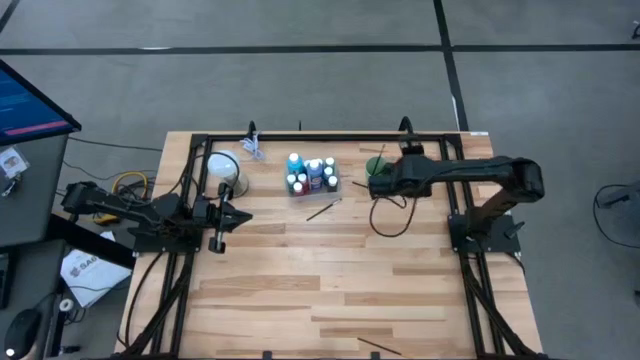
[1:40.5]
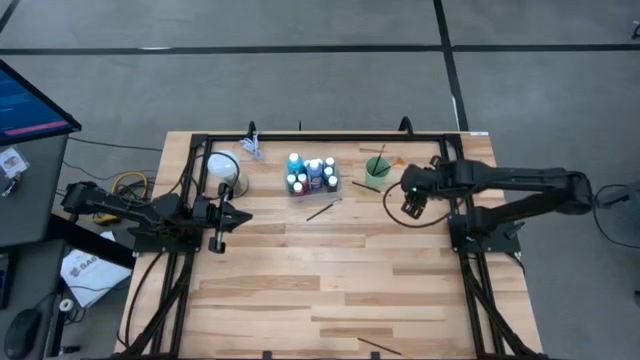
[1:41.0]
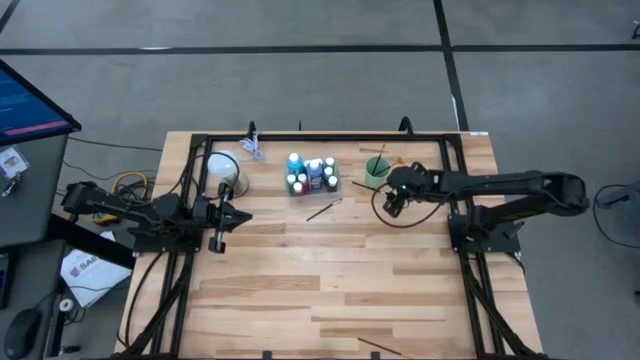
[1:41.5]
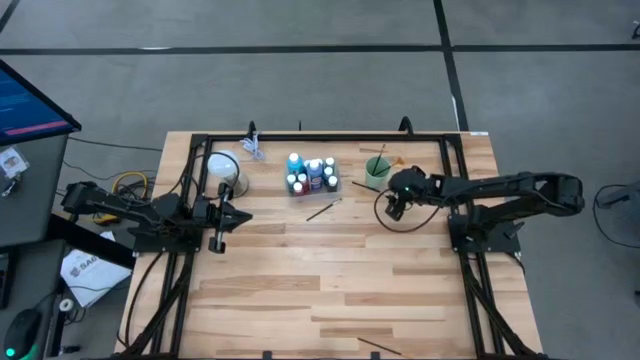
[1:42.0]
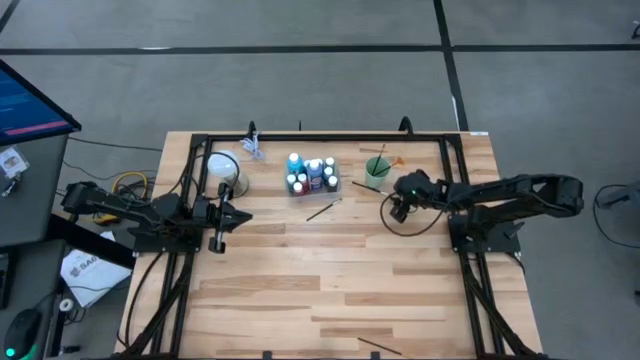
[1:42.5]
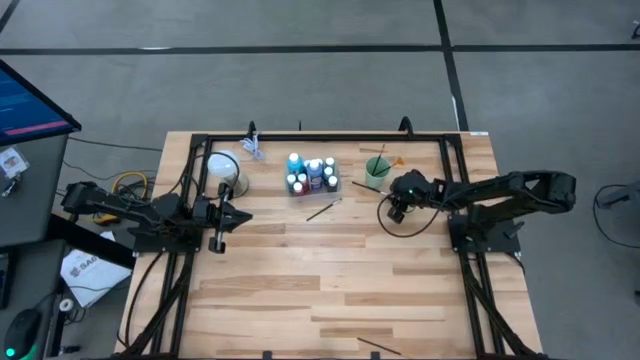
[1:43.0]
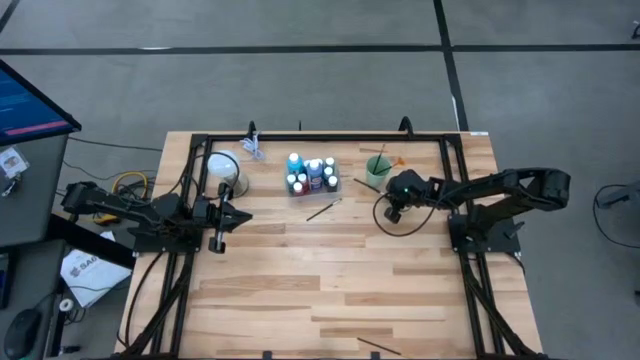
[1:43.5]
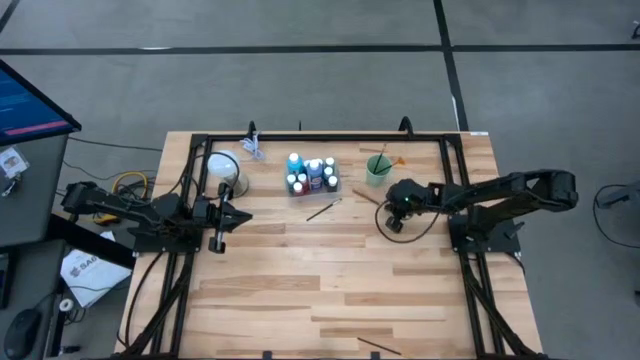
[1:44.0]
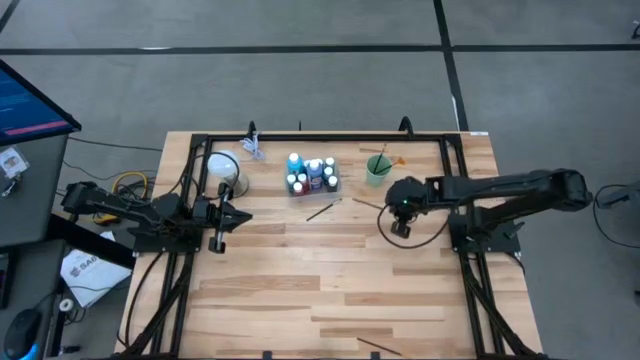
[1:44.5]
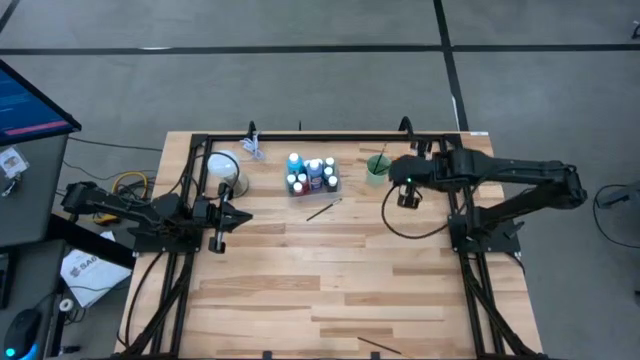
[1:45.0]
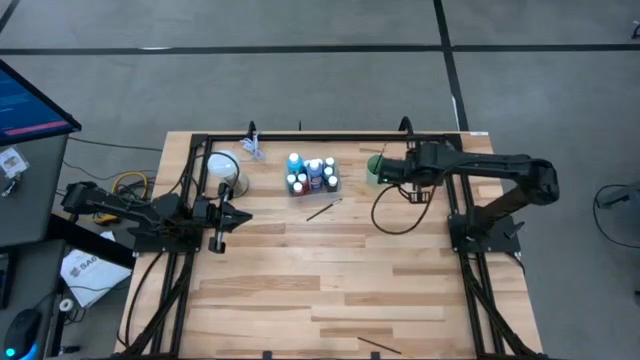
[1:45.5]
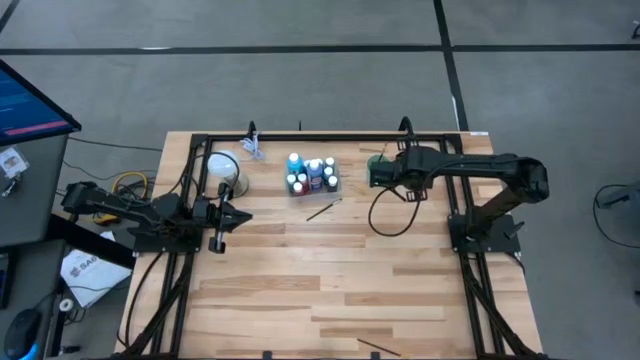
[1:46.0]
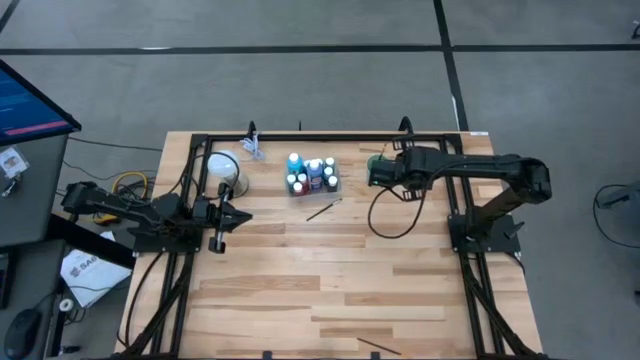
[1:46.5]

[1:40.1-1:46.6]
Task: Pick & Place Paint Supplies
Put the top silver paint brush into the cup

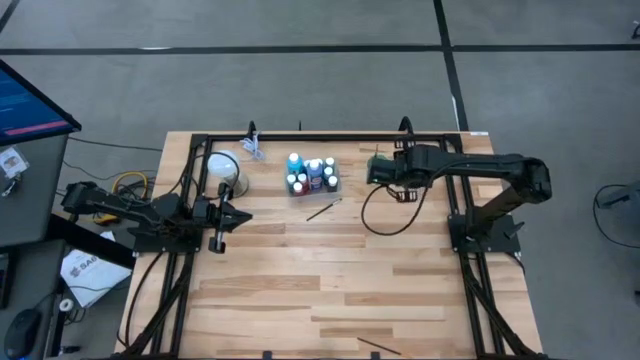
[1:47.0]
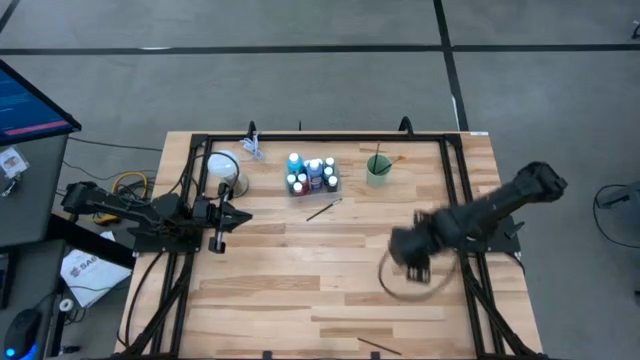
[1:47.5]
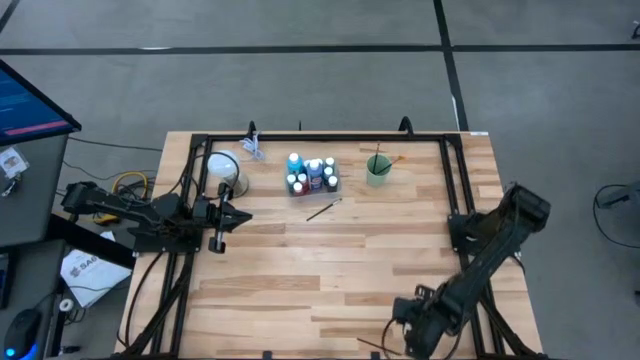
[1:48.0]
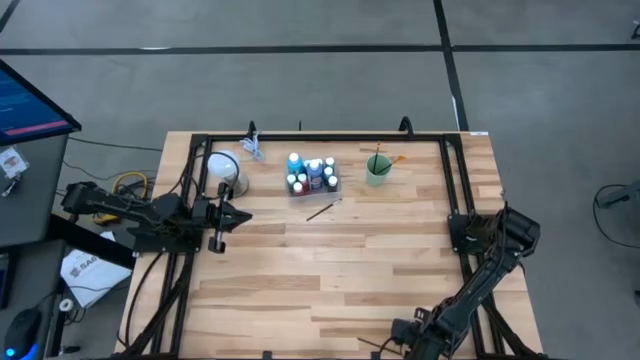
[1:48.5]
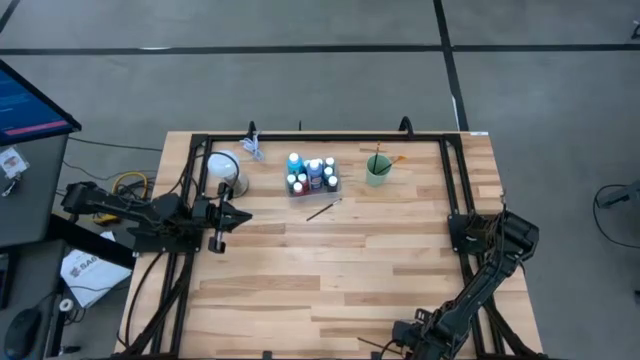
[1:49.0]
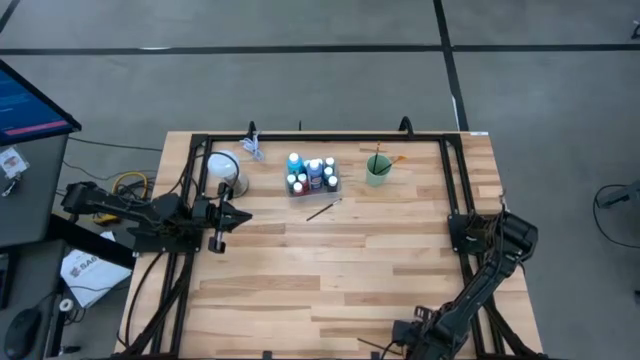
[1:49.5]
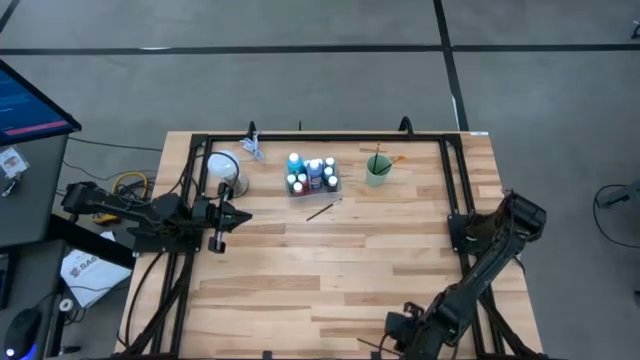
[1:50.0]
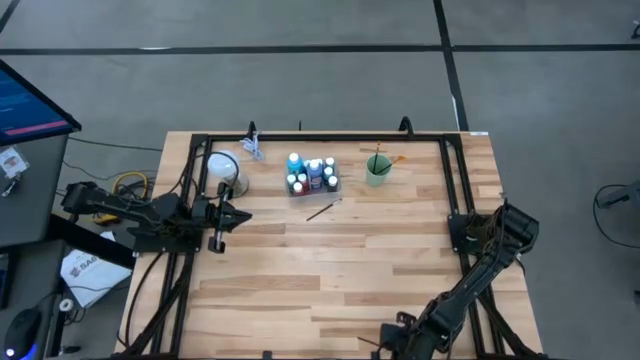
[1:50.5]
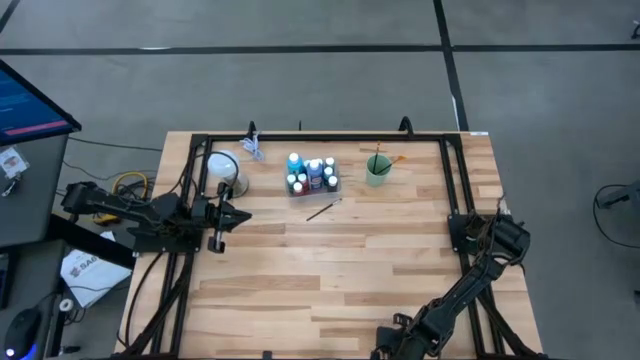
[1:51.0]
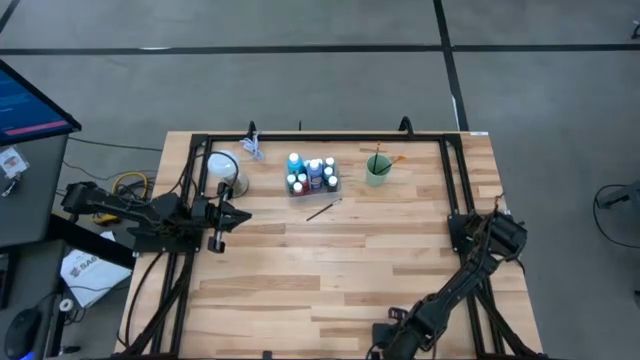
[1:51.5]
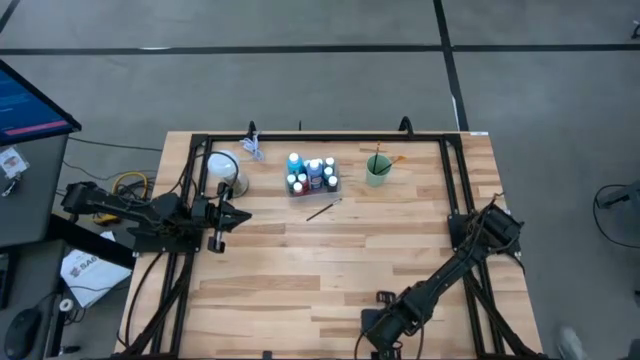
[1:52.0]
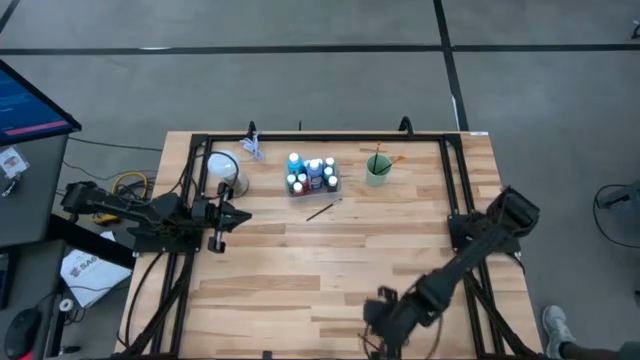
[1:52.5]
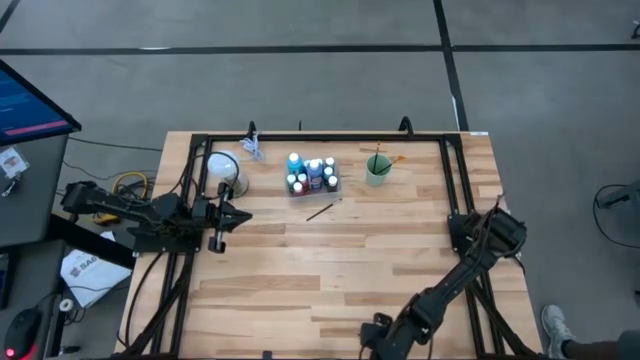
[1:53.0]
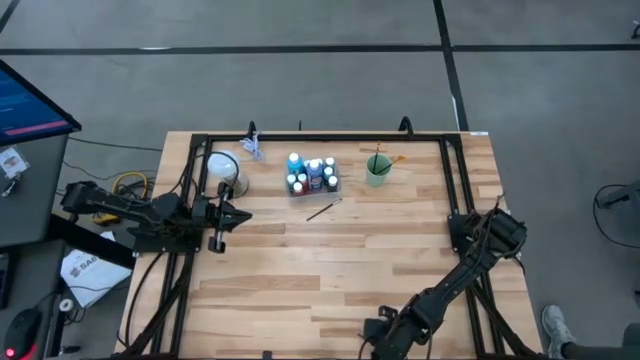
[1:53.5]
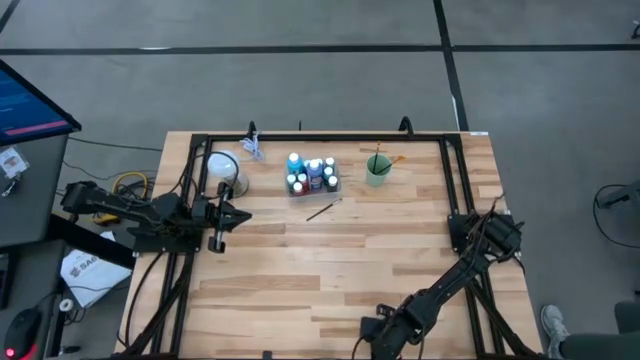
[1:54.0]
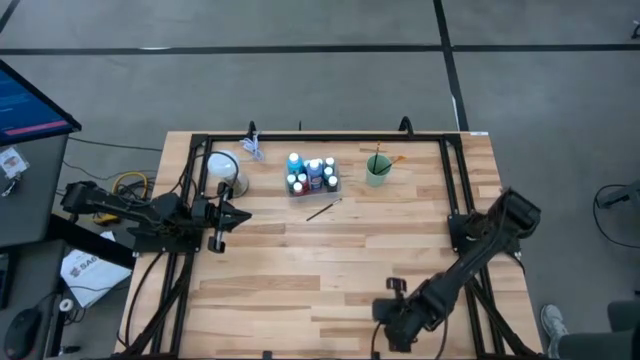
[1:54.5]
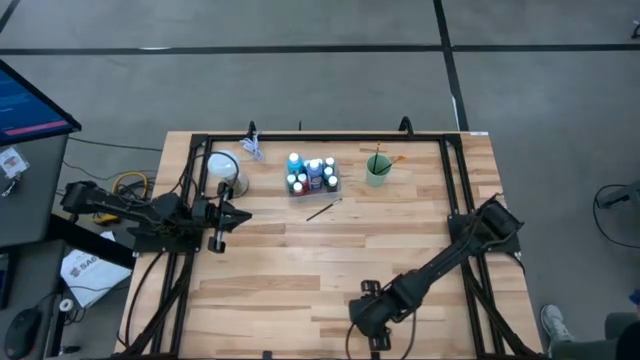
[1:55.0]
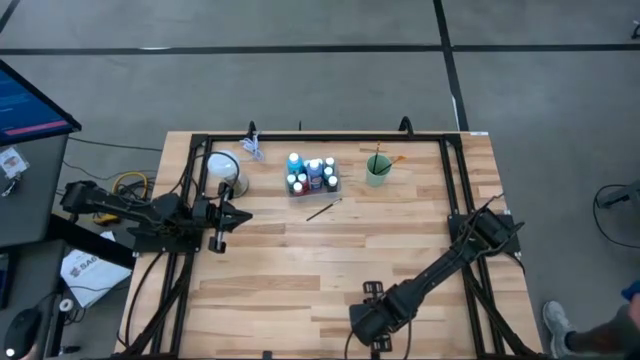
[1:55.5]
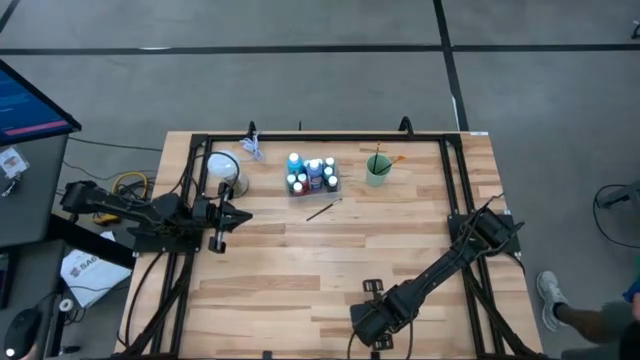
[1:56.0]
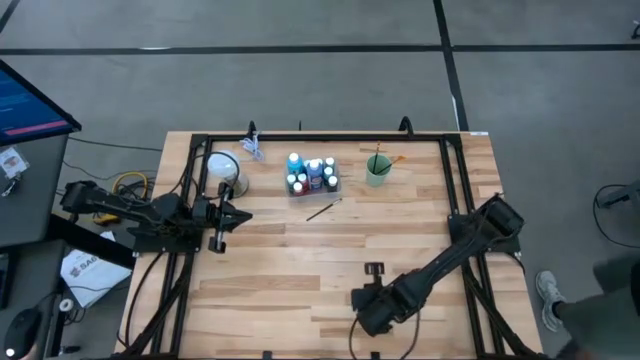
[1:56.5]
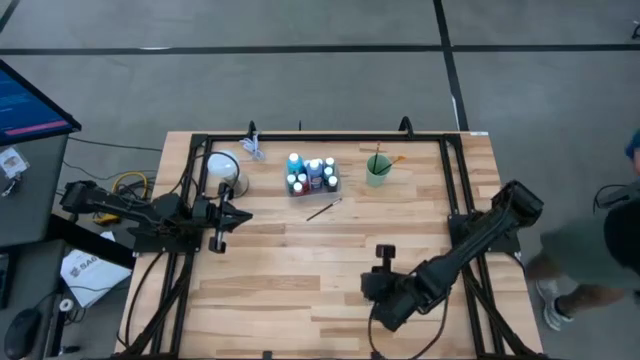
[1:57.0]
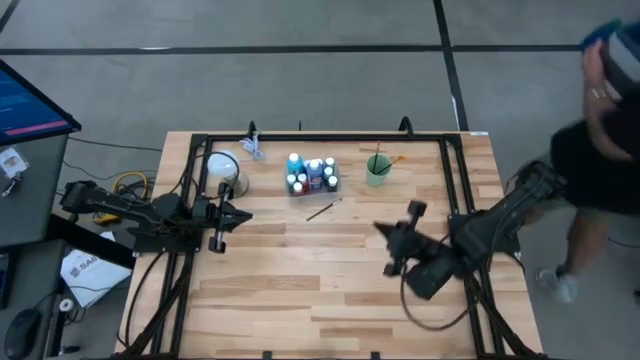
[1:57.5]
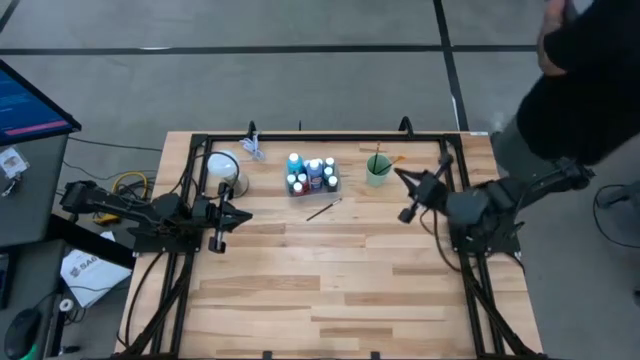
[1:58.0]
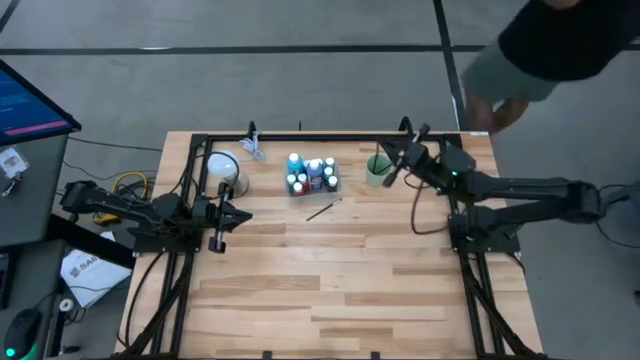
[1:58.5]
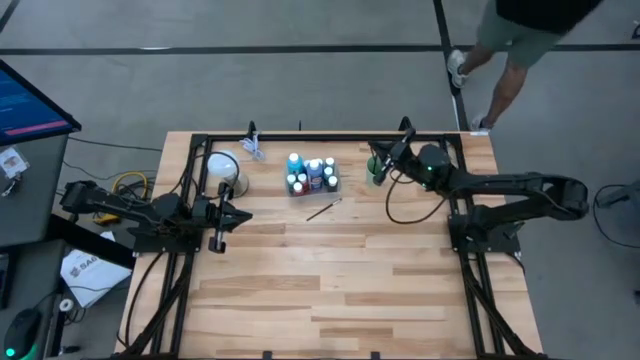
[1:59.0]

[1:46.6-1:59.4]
Put the gold paint brush into the cup

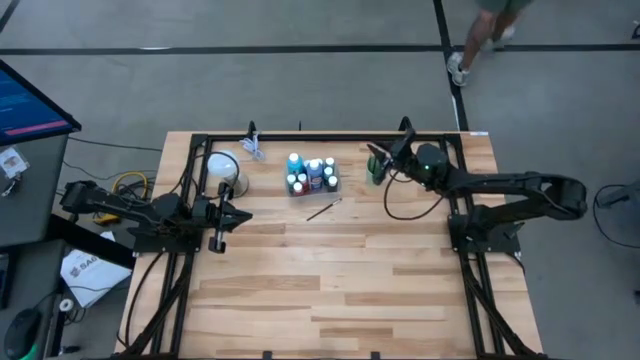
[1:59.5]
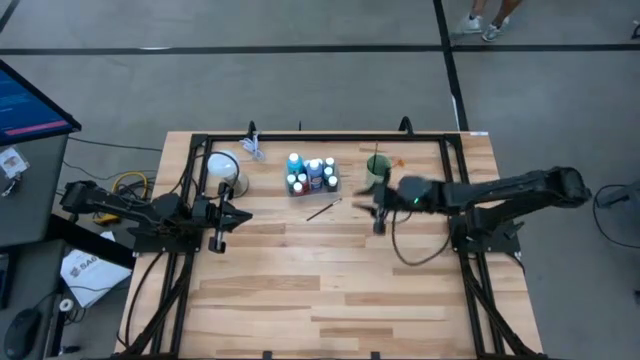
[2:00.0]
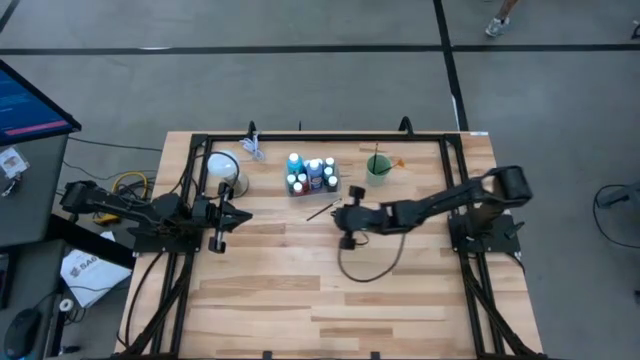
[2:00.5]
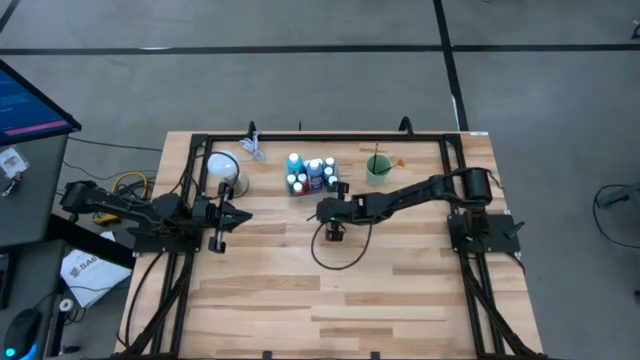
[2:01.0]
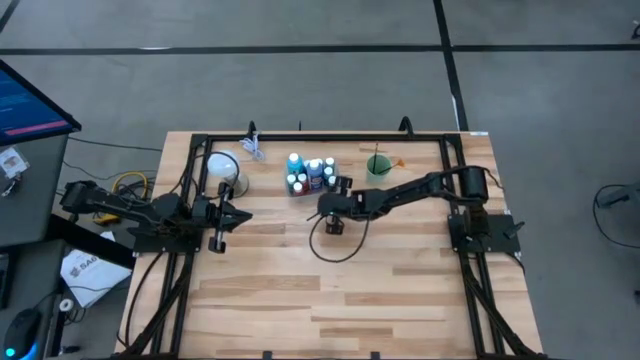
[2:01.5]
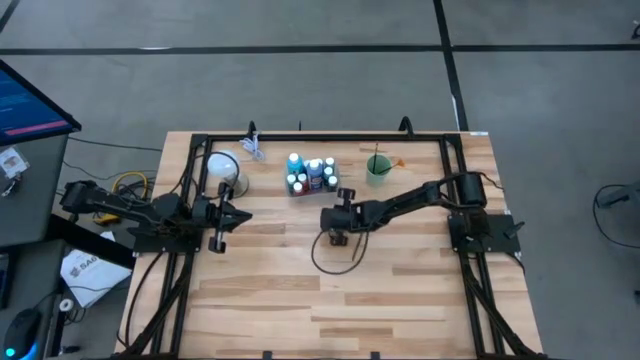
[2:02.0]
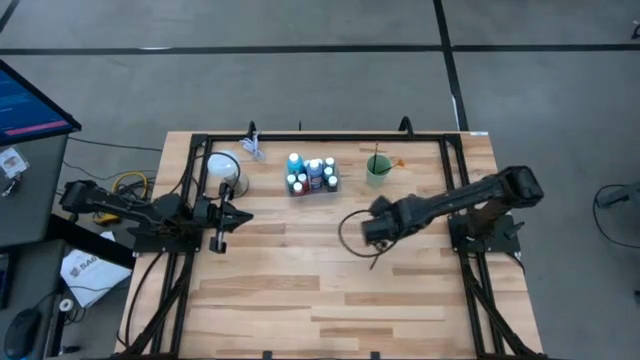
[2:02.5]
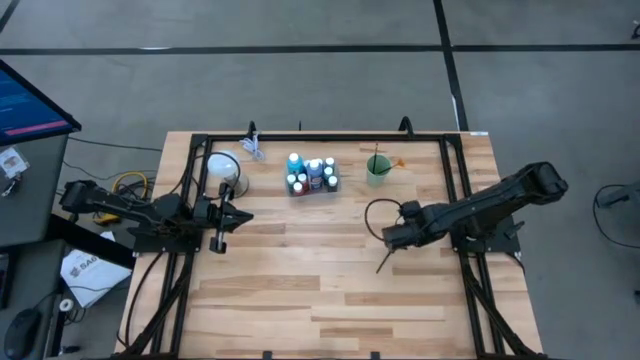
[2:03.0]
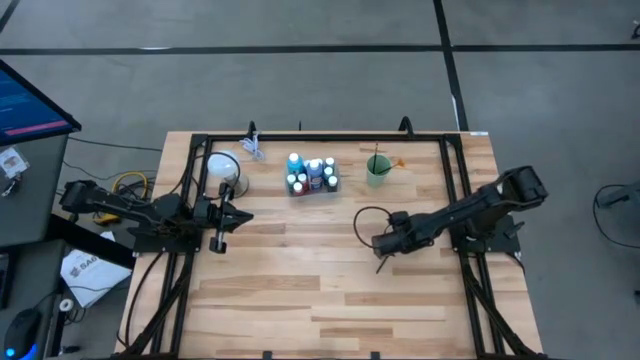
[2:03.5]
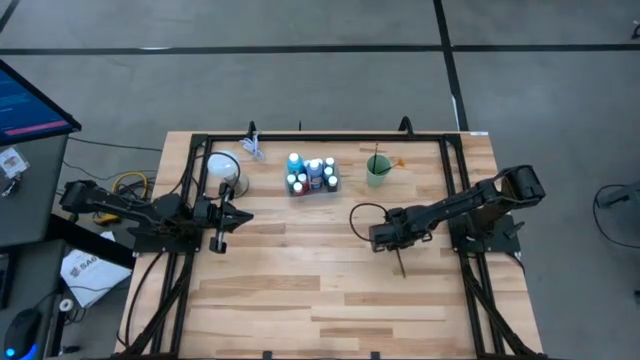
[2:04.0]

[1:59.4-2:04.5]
Put the silver paint brush into the cup
